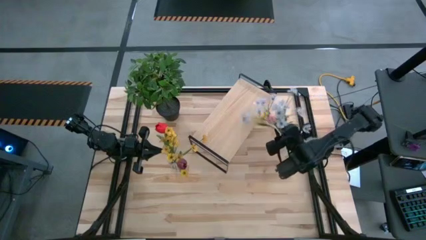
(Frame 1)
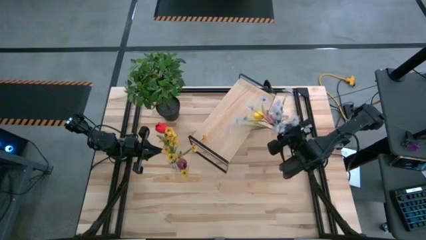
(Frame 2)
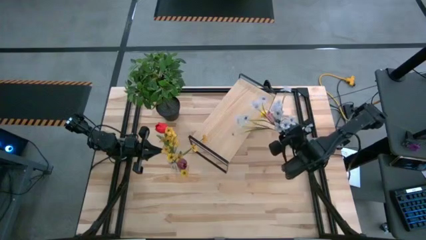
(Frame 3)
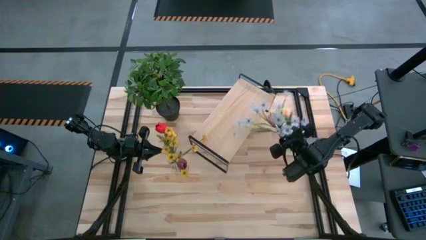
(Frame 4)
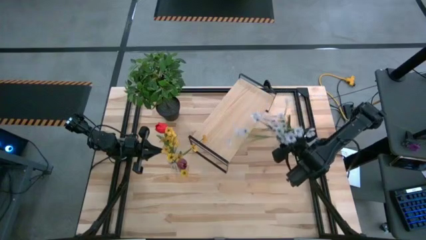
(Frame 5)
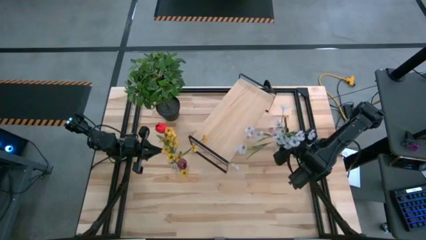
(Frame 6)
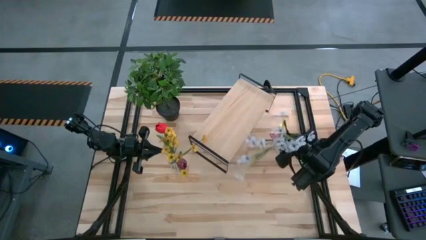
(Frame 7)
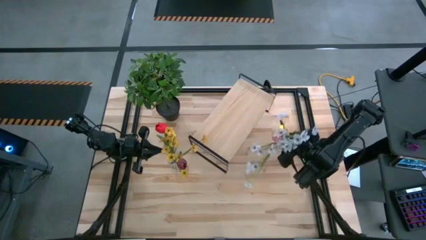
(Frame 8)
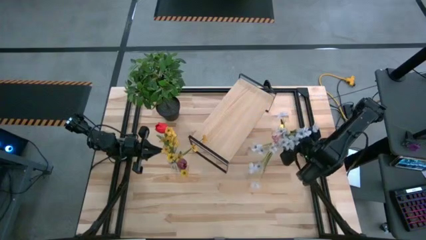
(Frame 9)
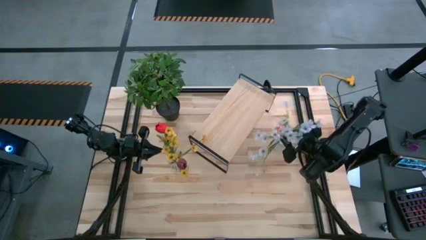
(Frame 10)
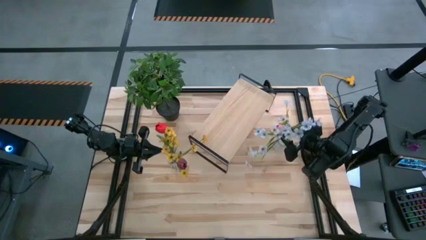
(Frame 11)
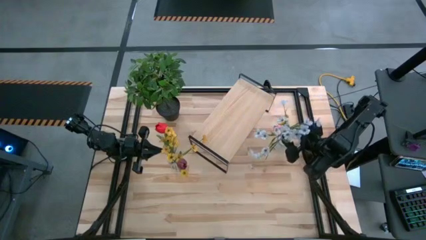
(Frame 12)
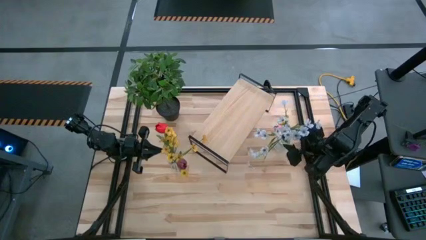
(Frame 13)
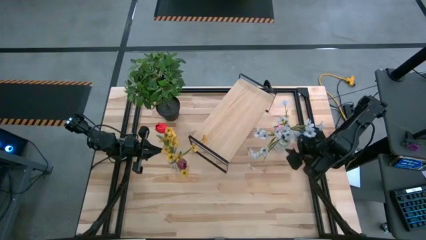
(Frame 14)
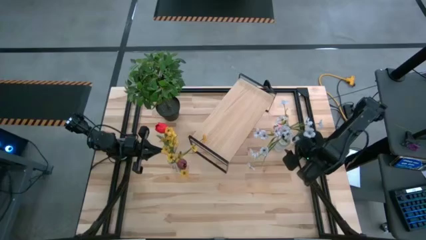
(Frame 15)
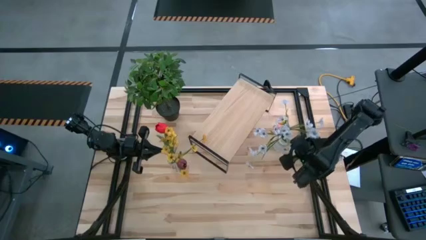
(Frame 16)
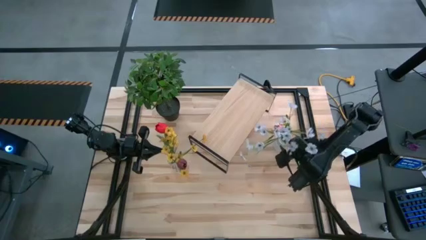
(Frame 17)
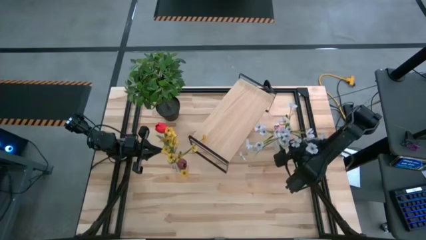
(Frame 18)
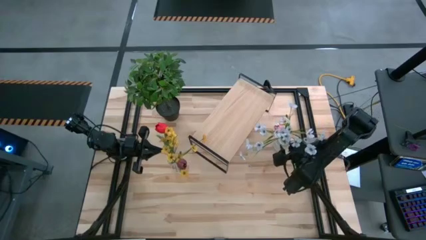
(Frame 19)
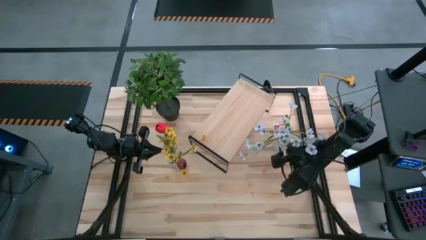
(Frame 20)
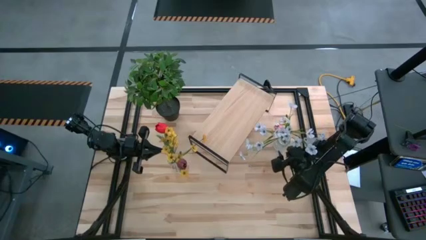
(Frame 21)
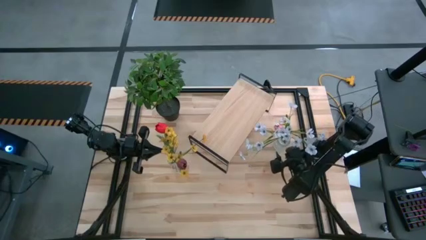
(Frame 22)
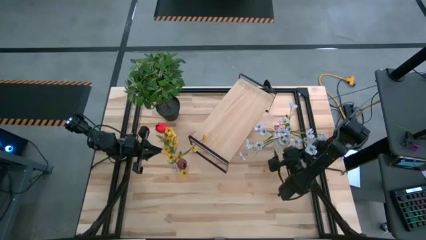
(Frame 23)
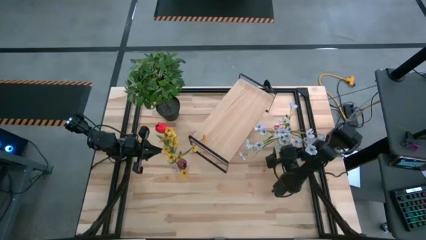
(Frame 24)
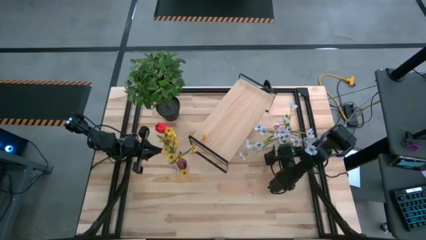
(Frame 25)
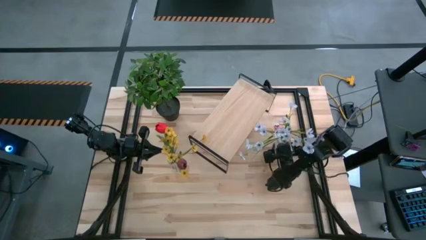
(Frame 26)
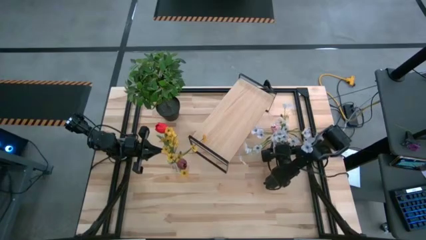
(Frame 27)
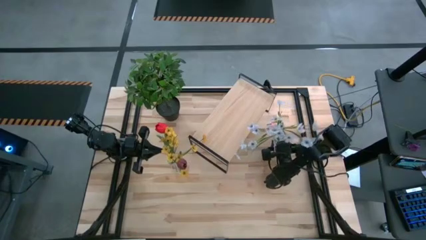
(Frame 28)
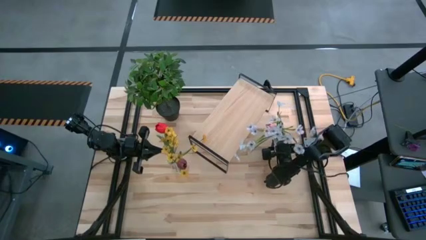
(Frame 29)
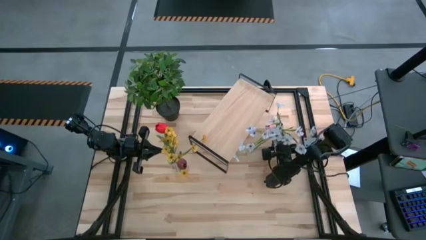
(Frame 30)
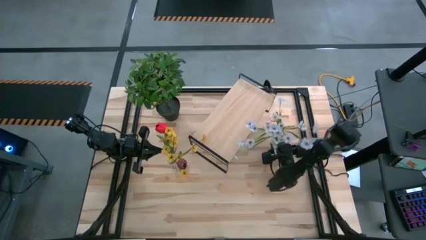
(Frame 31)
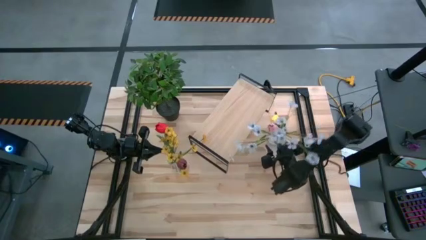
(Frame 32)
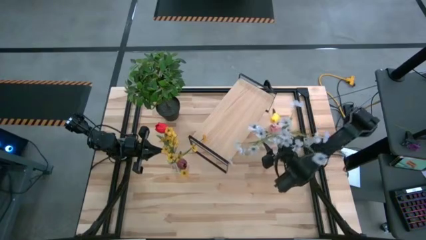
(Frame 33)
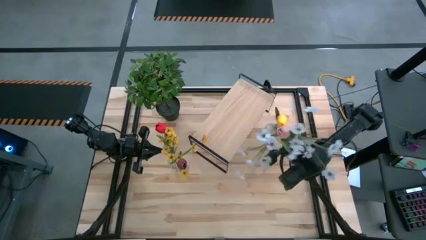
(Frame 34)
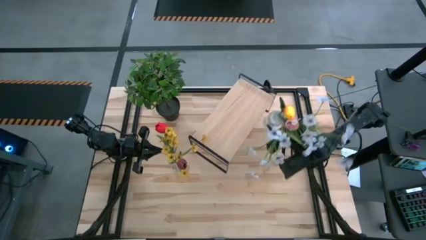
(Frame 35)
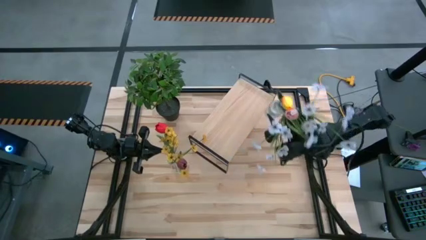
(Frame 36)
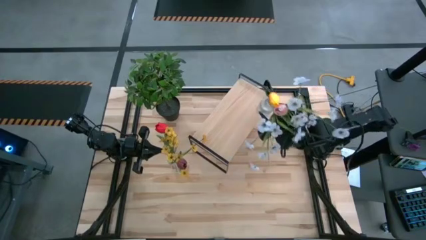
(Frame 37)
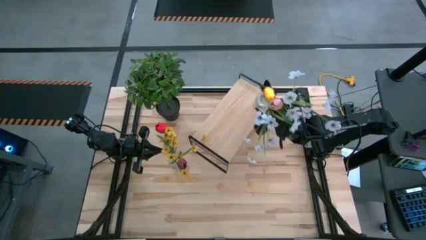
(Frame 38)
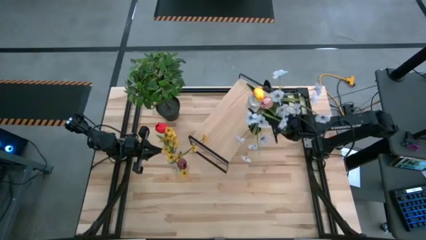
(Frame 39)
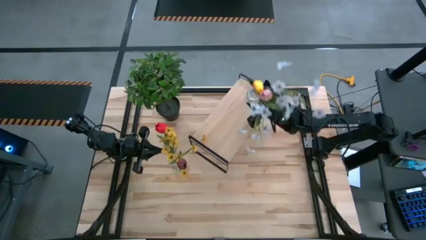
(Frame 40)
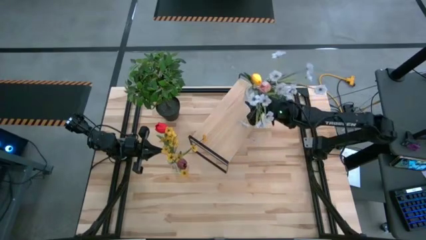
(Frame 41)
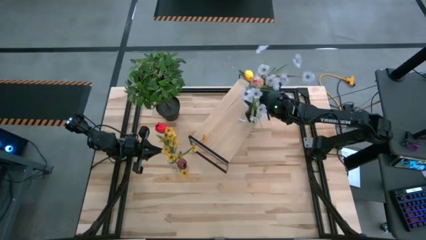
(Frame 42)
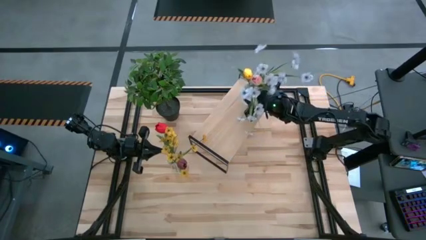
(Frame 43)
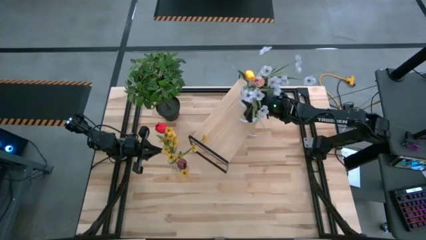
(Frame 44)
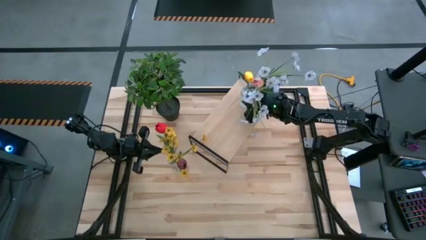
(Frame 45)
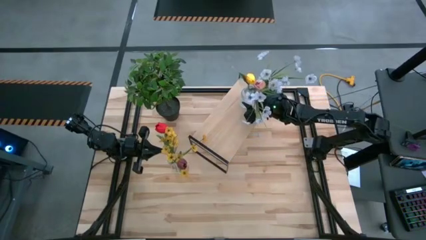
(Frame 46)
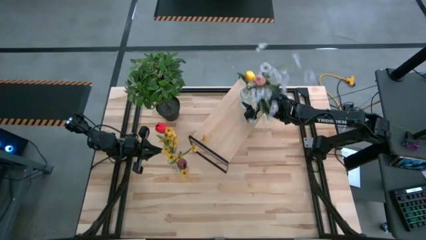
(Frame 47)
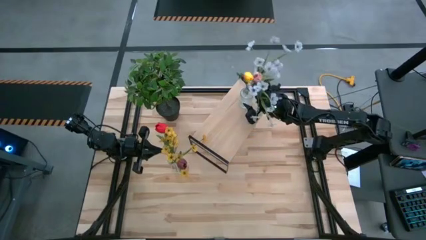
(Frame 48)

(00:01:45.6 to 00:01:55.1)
Task: Pick and place flowers into a vace then onto a shelf
Put the right flower vase on the shelf

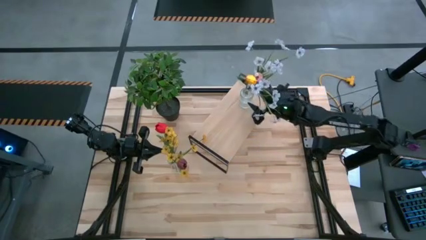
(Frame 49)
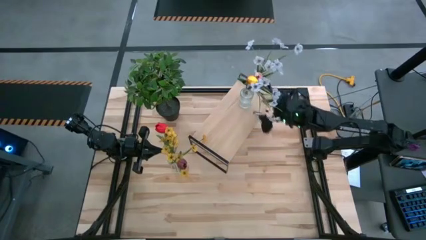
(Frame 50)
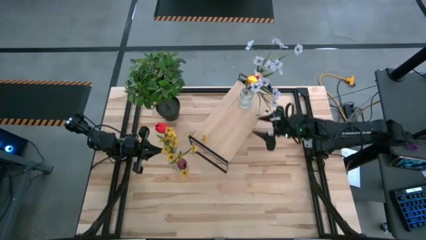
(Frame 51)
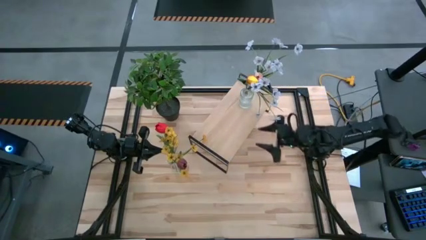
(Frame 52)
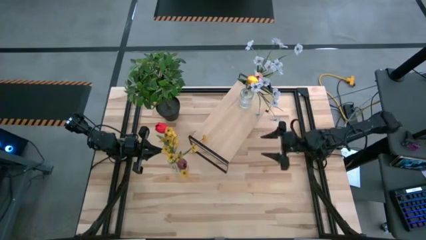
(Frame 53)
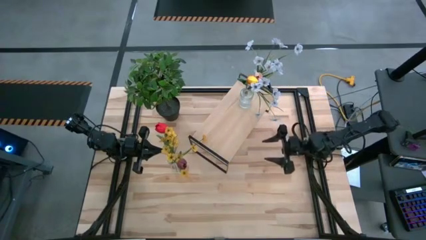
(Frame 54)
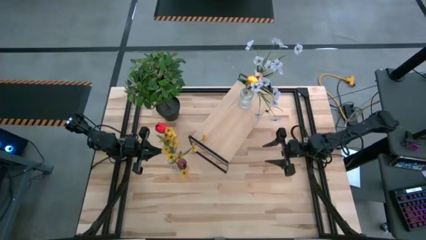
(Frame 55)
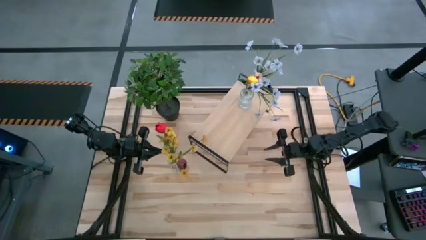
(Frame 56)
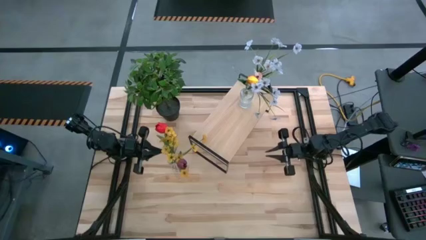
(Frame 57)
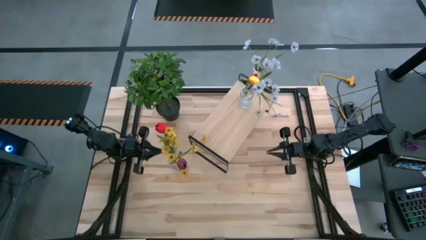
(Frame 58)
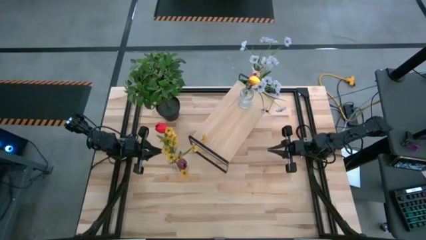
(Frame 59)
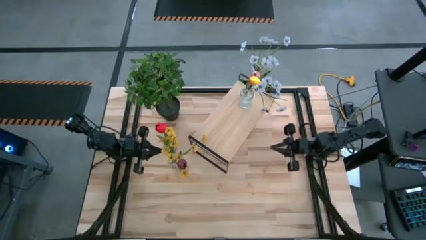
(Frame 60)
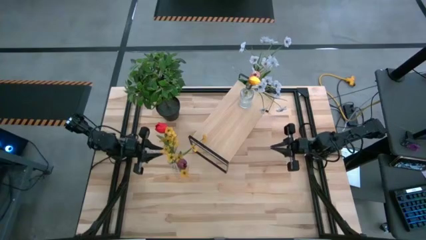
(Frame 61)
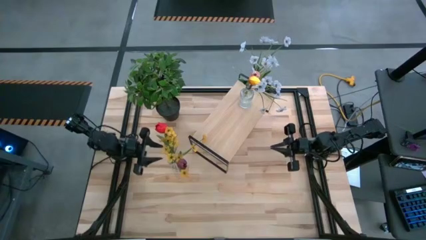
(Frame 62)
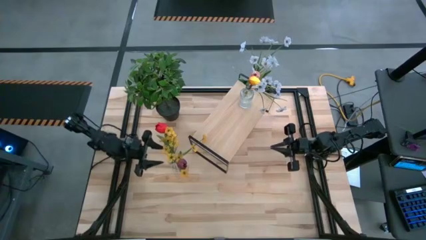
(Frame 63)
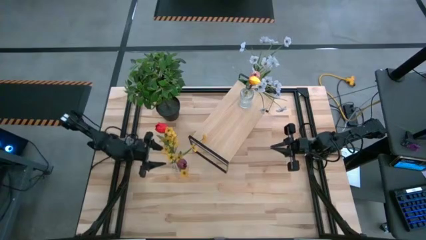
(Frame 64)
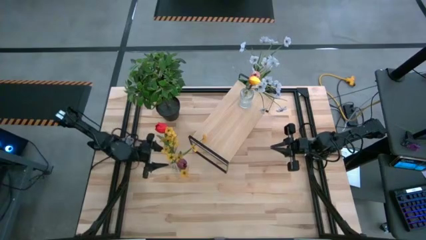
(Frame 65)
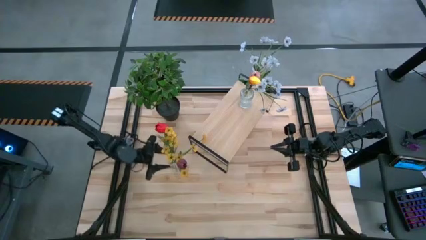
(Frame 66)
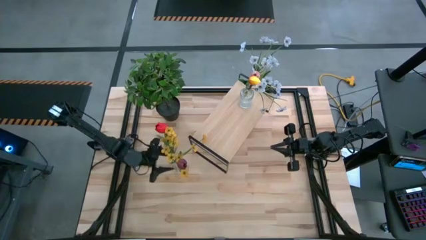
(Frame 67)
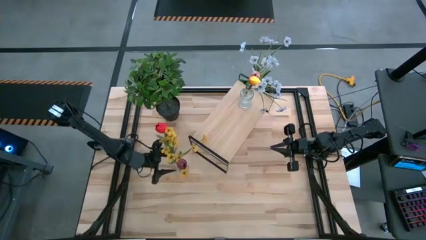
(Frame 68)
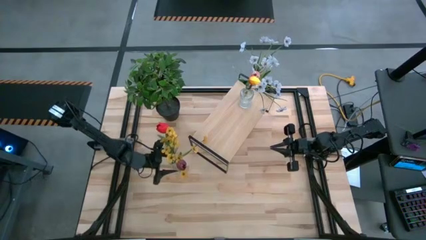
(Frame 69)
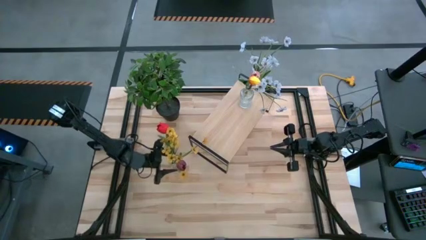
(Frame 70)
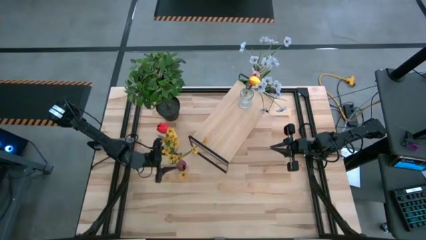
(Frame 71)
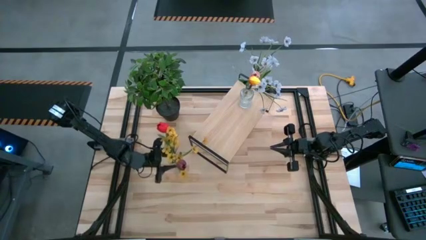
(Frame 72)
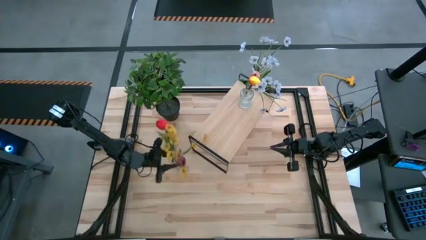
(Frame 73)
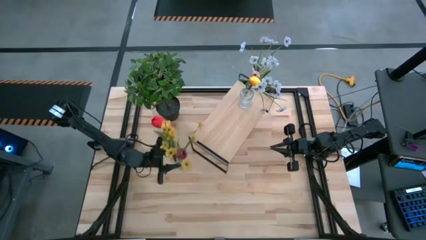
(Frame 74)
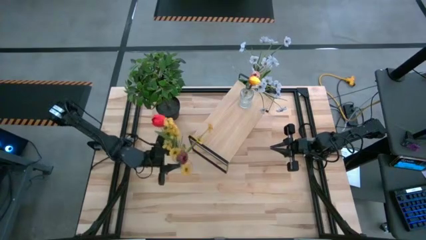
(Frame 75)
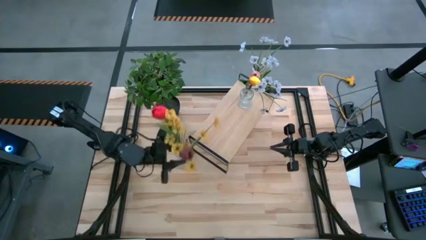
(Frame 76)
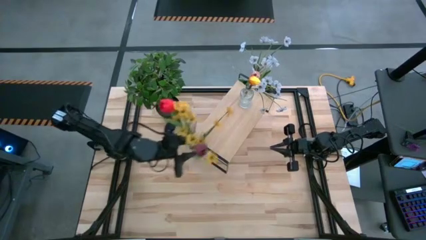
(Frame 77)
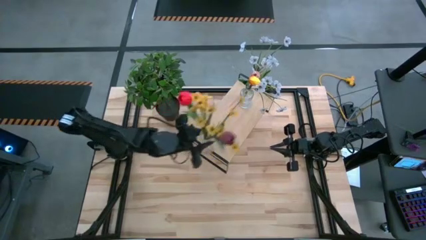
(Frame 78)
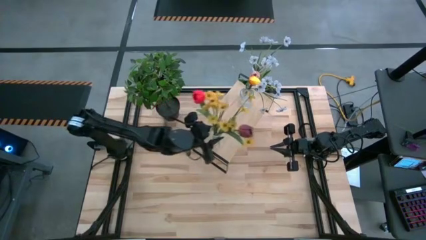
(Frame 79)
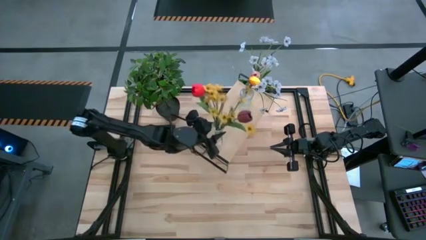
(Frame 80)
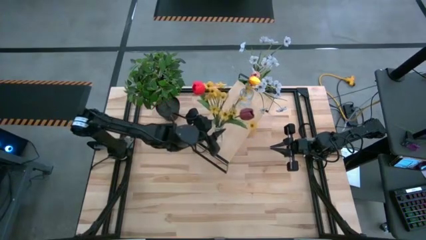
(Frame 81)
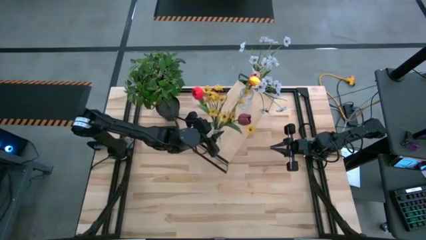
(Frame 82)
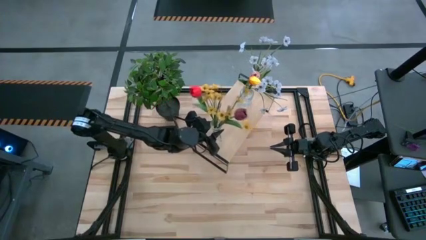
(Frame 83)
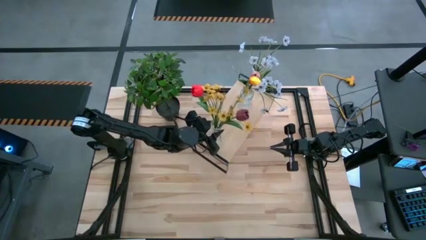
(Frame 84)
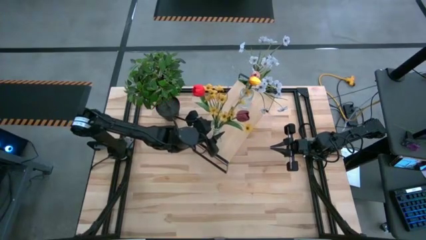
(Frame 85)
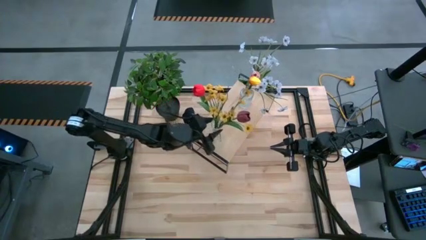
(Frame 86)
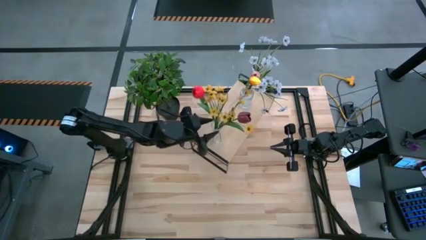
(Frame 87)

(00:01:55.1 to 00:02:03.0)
Put the flower vase on the shelf
